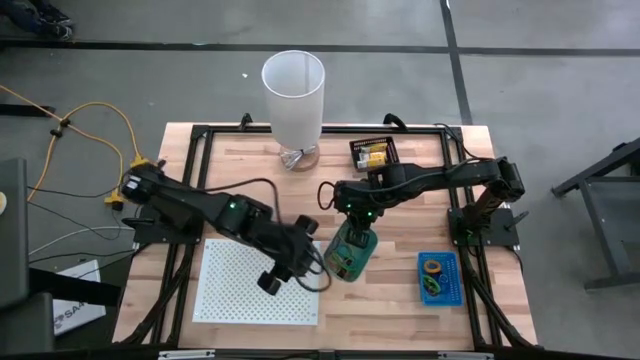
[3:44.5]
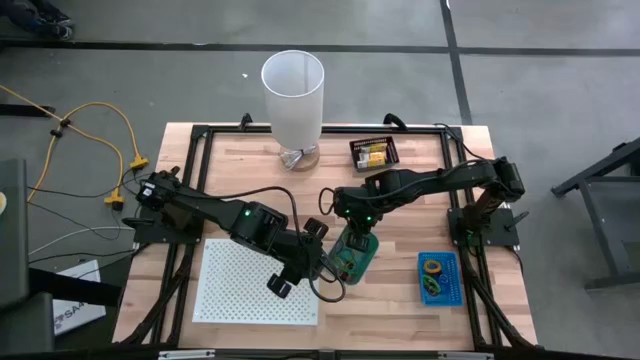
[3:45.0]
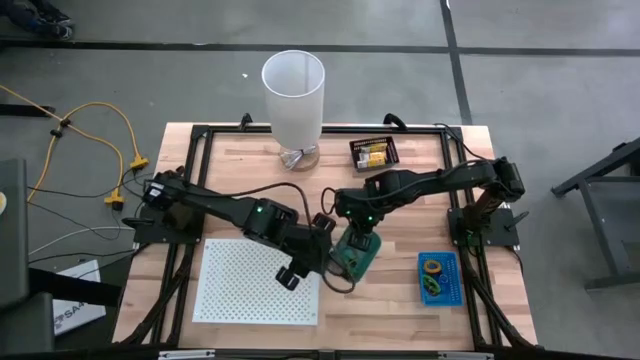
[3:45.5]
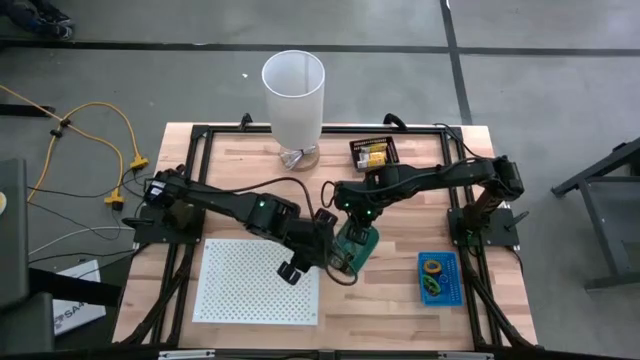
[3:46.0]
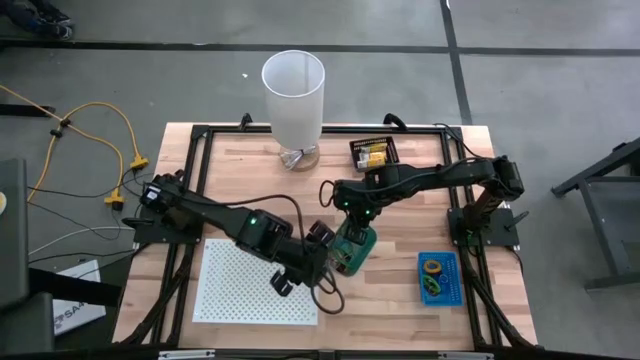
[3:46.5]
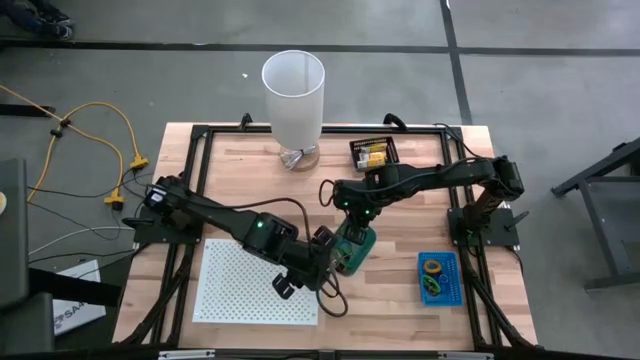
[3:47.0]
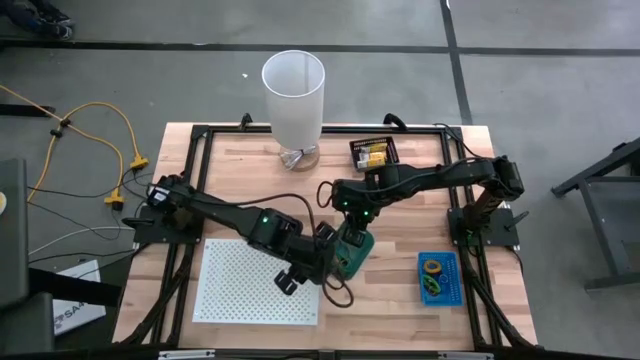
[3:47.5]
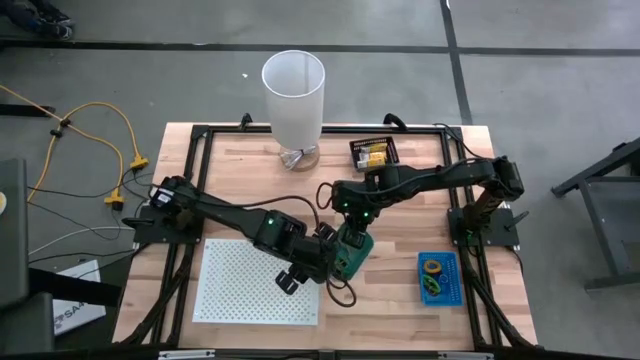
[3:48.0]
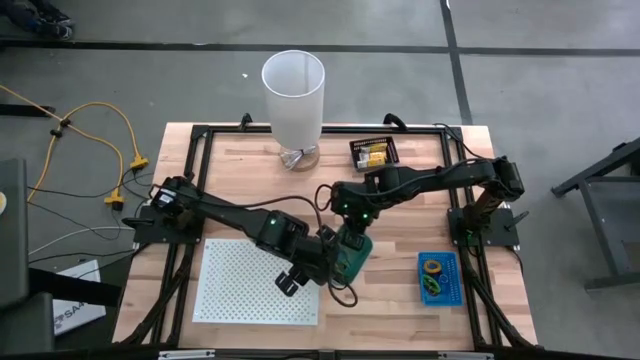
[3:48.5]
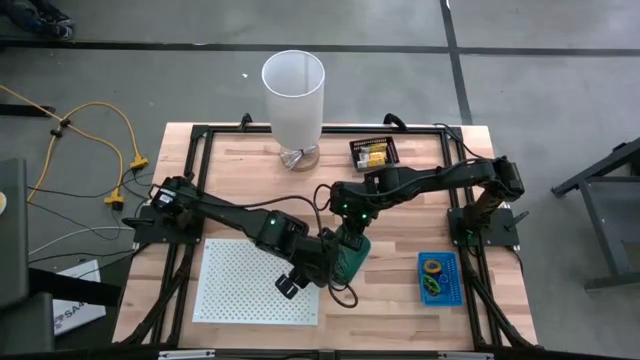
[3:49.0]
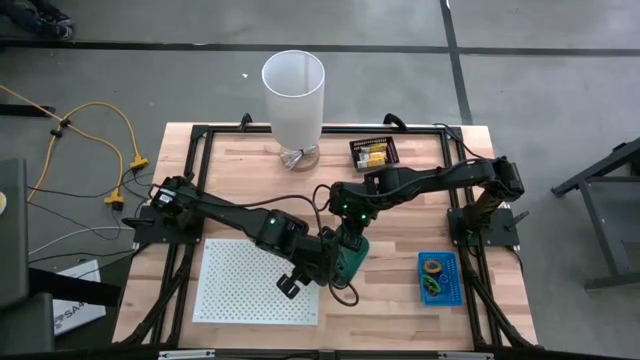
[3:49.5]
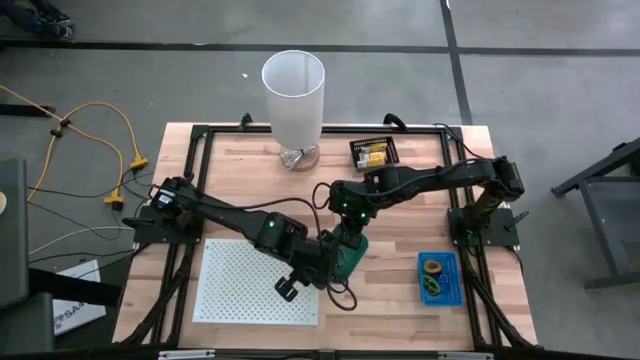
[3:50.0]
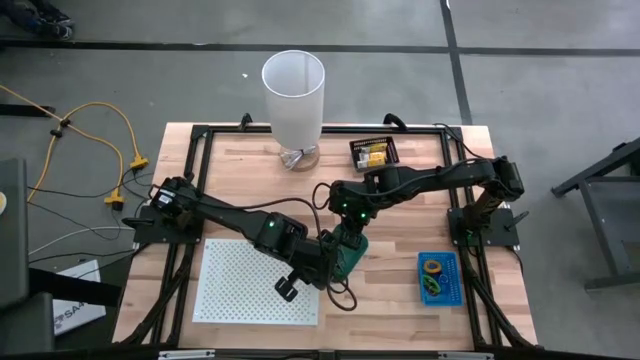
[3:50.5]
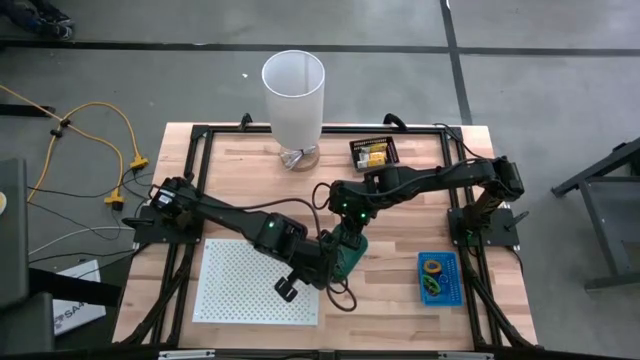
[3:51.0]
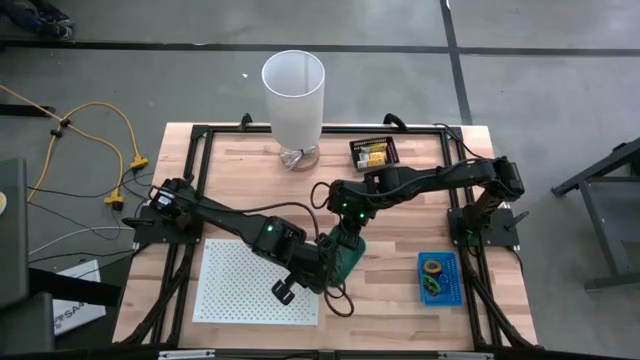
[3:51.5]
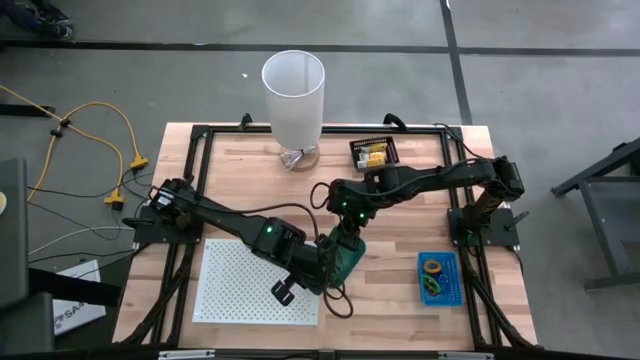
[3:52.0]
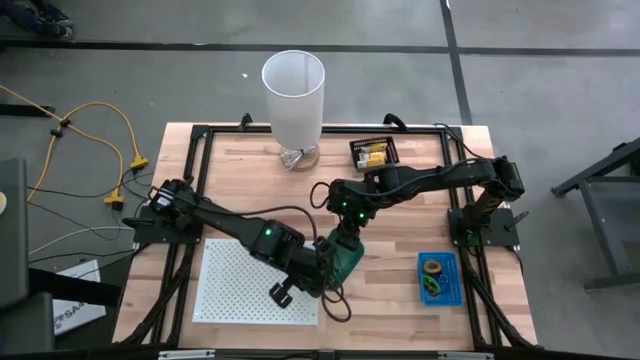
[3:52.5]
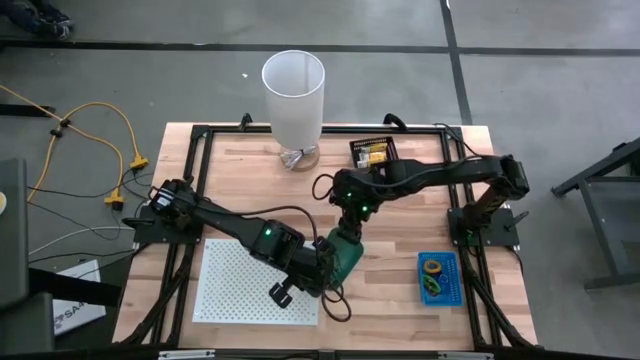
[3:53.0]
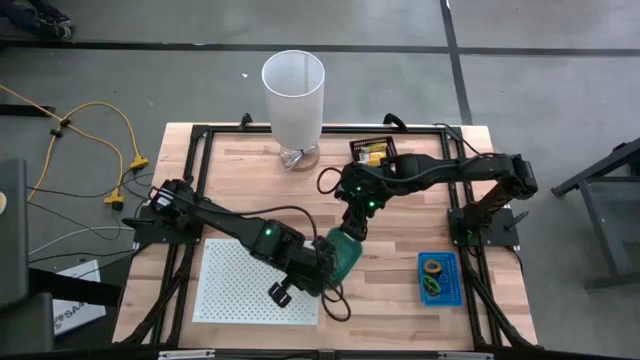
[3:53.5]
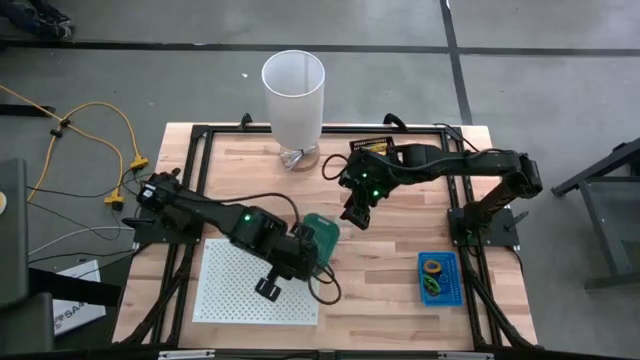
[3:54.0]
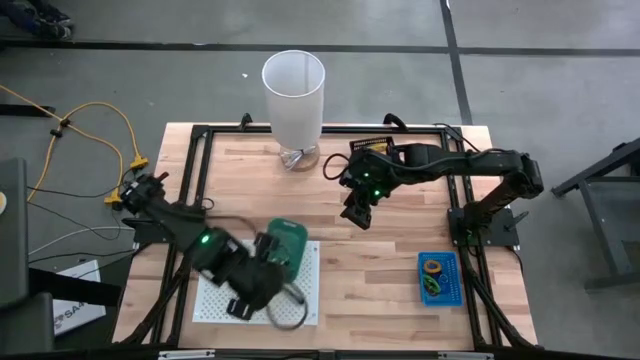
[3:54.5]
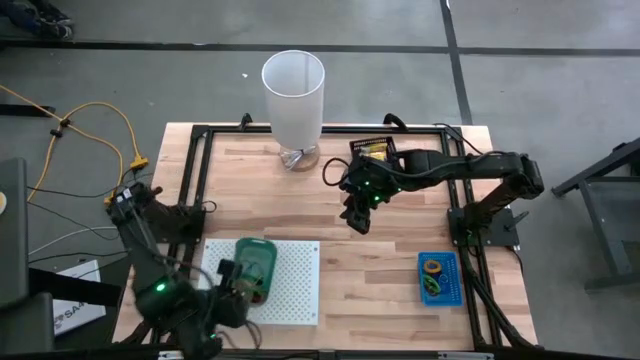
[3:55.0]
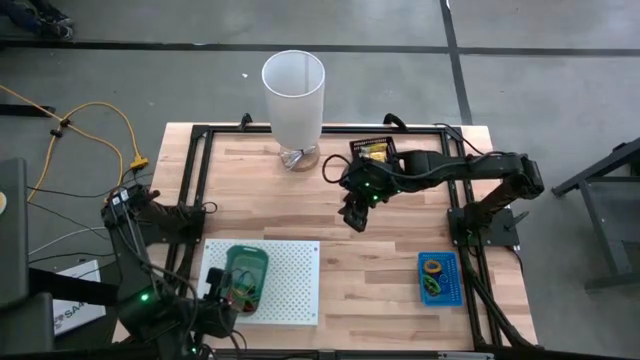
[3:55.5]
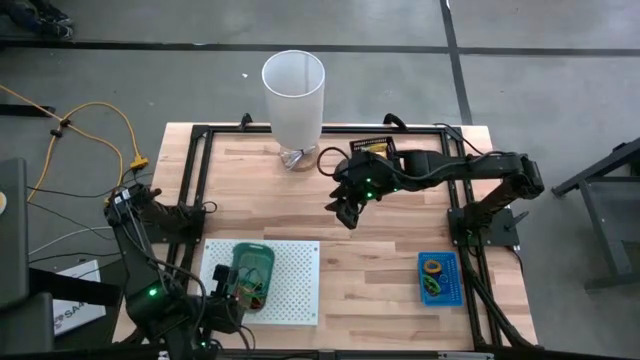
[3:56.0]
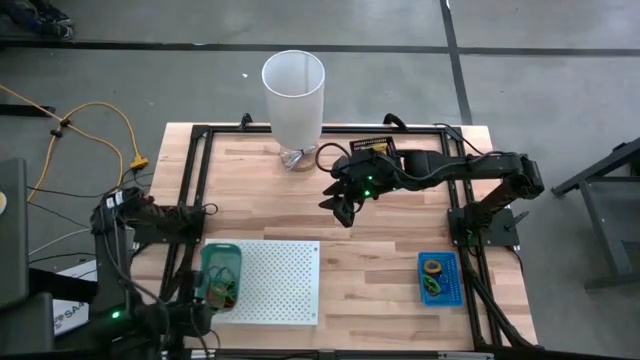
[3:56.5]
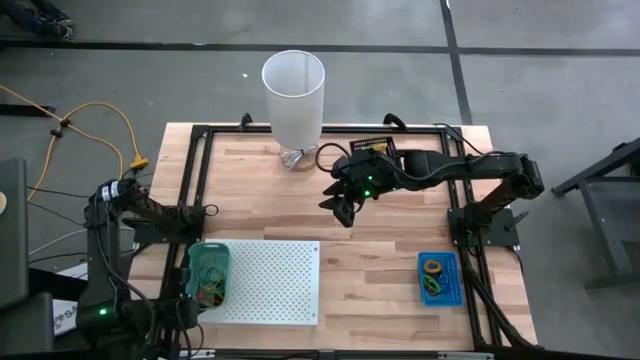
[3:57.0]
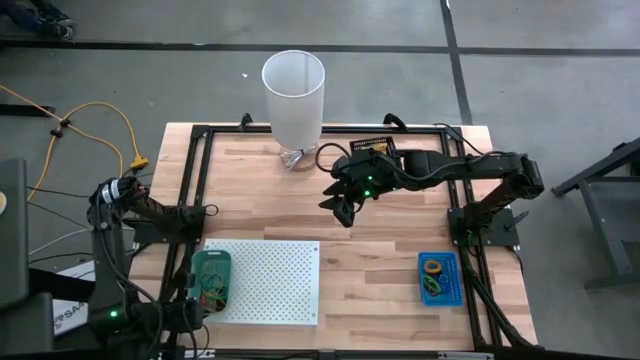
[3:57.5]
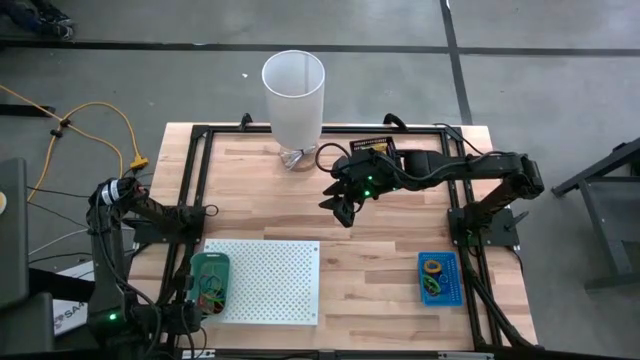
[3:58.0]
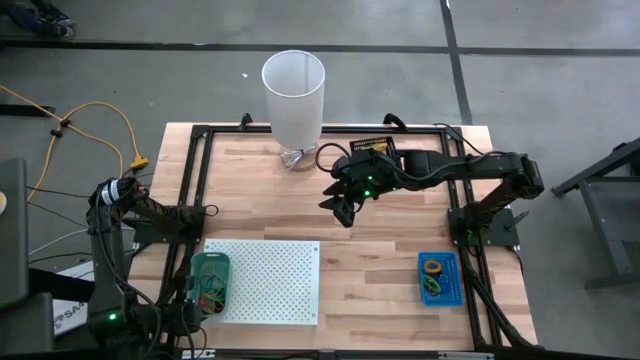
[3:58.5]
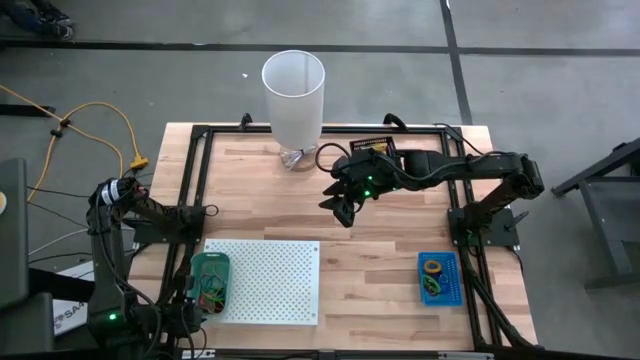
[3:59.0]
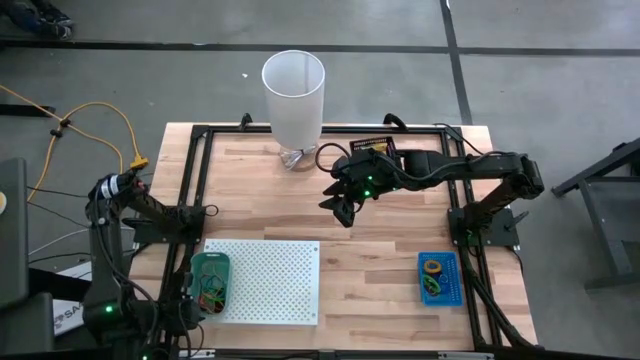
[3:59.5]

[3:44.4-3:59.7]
Task: Pick & Place Office Desk Supplies
Put the green bin on the shelf

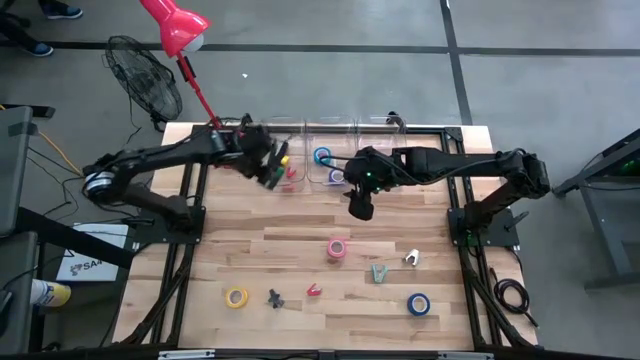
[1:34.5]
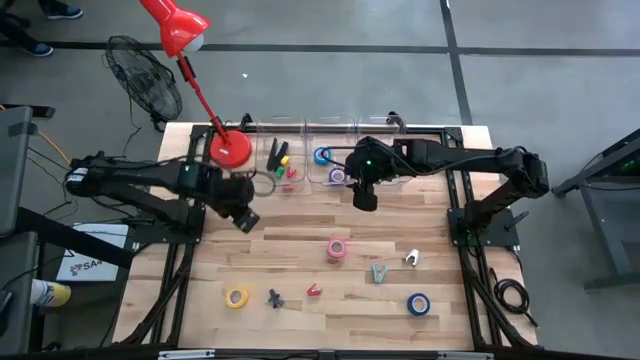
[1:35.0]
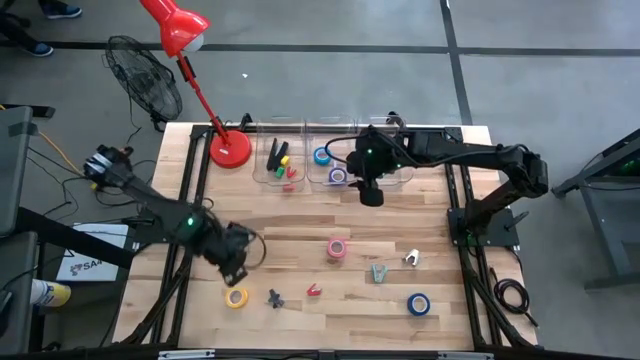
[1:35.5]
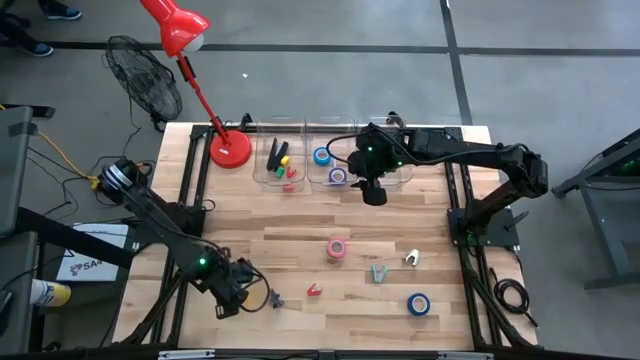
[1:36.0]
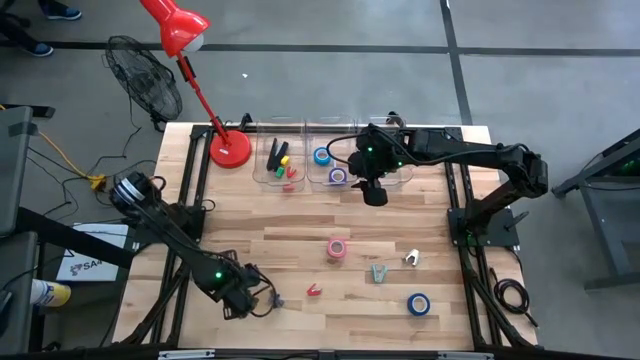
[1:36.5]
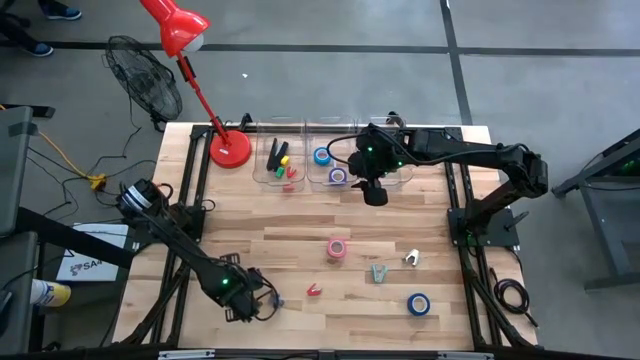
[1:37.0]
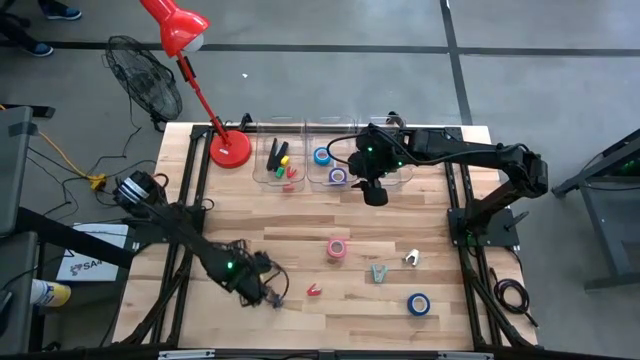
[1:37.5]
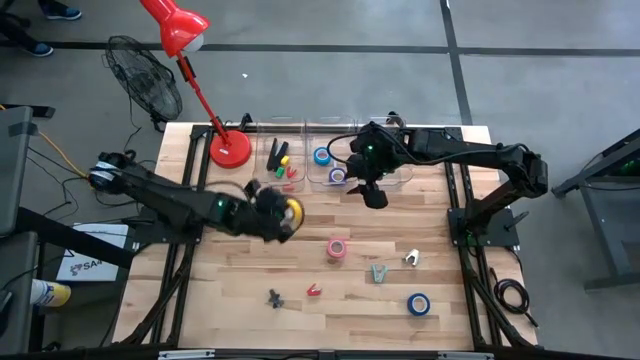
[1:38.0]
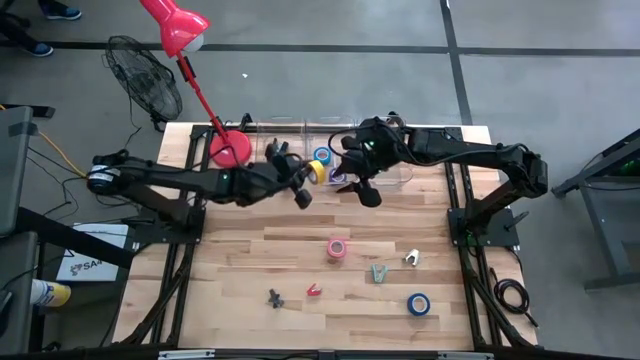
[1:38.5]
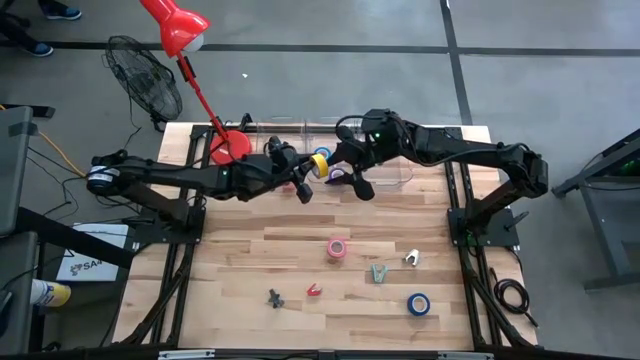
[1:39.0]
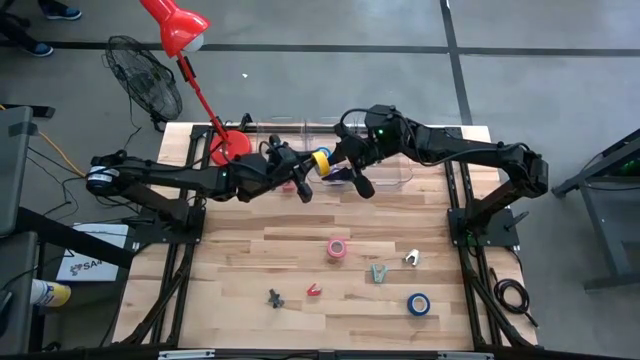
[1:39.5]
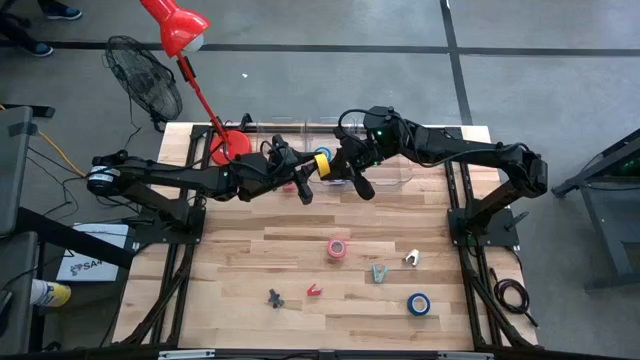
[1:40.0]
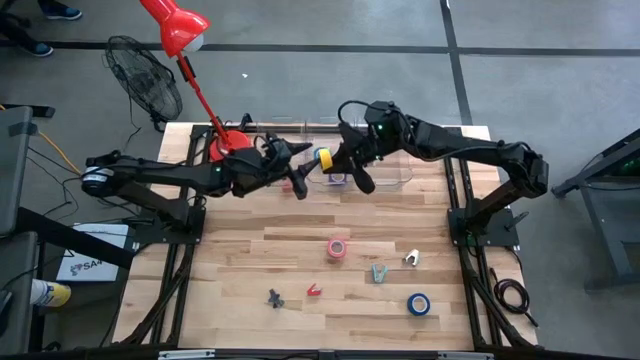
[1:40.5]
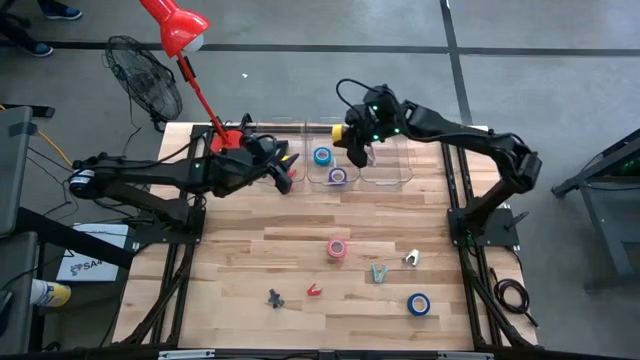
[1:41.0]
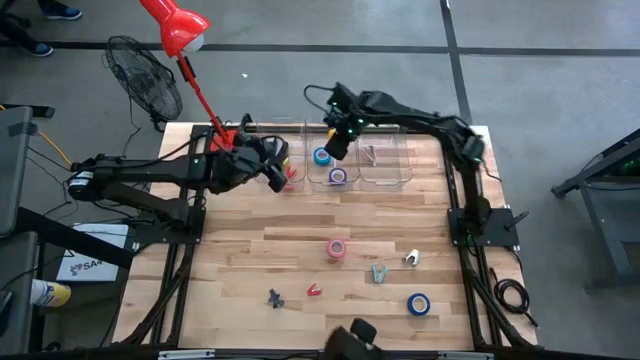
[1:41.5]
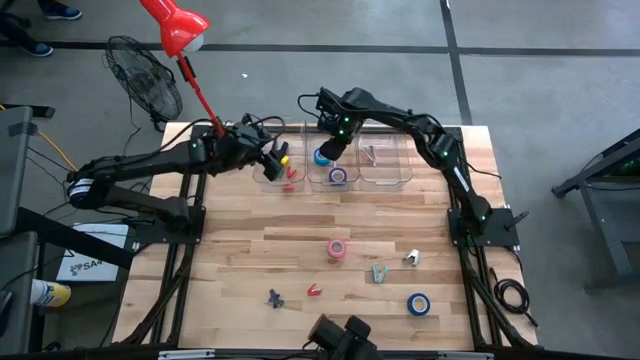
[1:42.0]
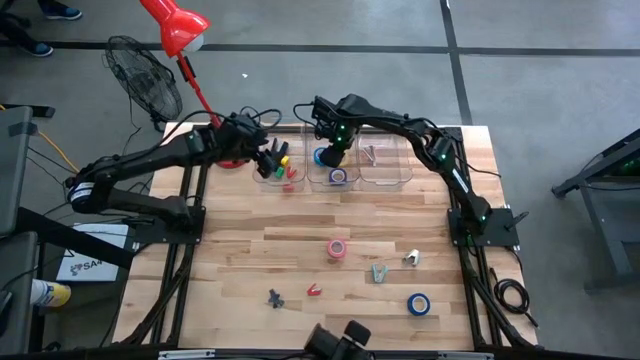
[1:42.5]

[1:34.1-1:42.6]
Task: Pick and place Stapler, Stapler remover, tape
Put the yellow tape into the middle transparent bin
